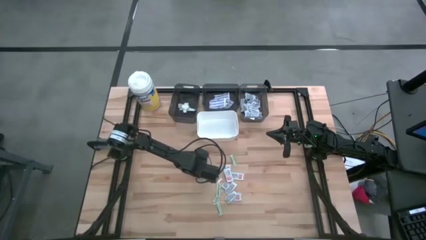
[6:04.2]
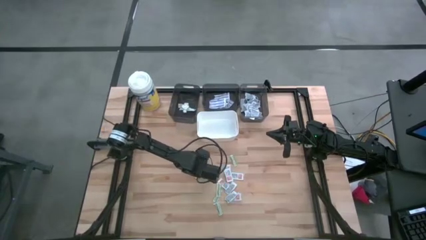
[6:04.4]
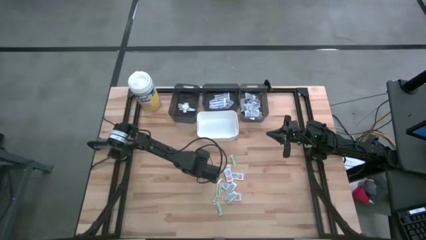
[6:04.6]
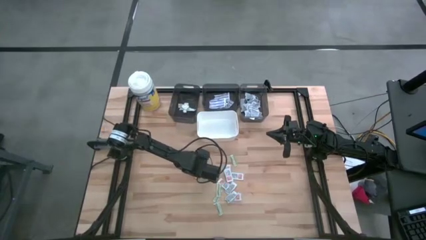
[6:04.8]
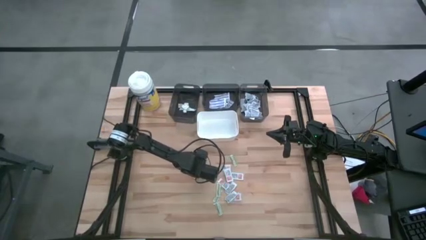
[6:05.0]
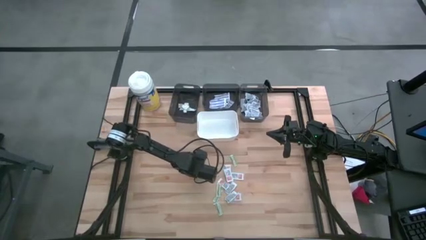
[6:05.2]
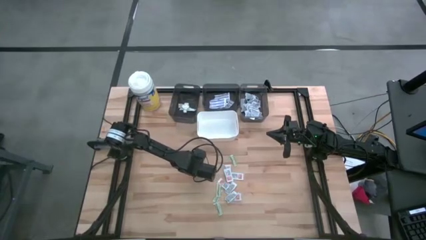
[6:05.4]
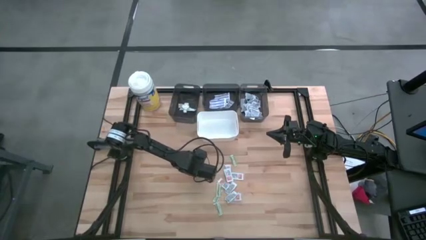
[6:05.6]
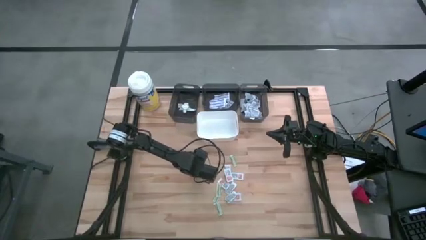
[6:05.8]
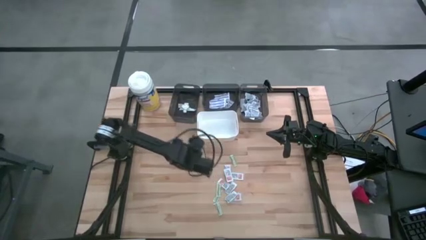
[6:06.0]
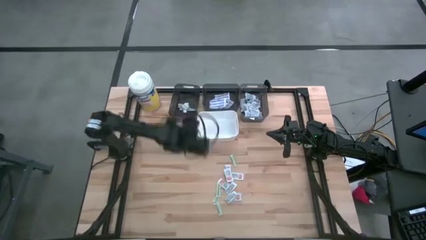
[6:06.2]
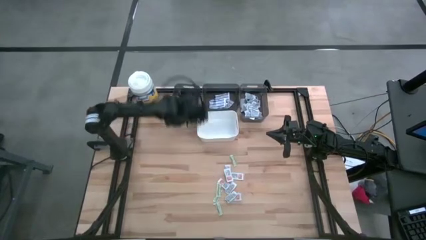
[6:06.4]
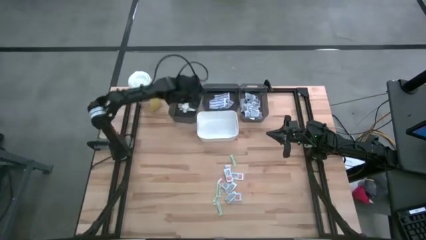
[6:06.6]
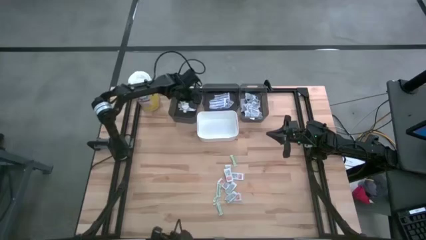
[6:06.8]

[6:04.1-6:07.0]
Task: Pick & Place First Aid Supplies
Put the green bandage pack into the left black bin

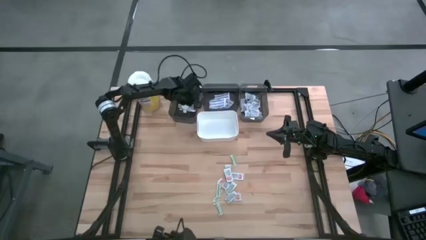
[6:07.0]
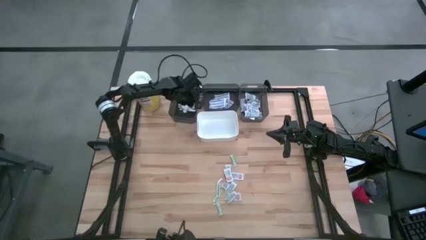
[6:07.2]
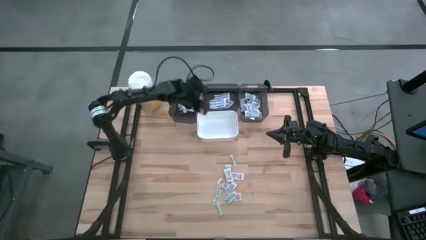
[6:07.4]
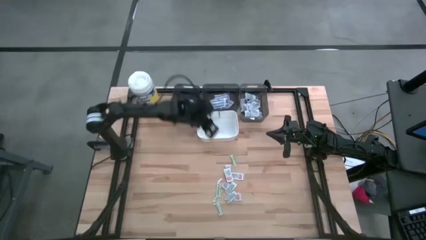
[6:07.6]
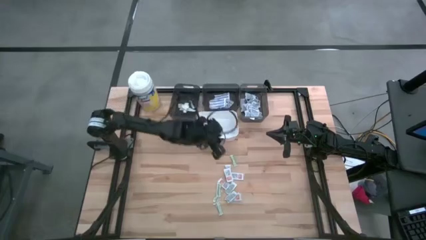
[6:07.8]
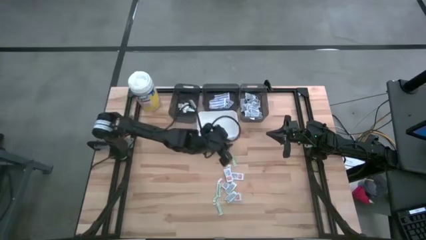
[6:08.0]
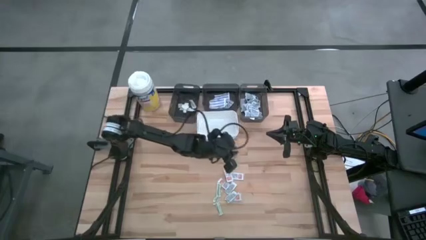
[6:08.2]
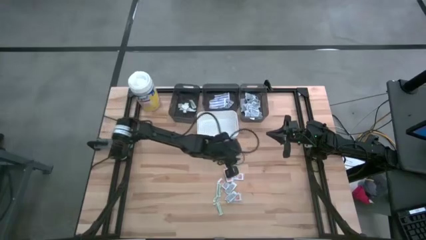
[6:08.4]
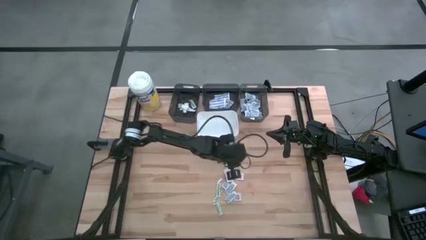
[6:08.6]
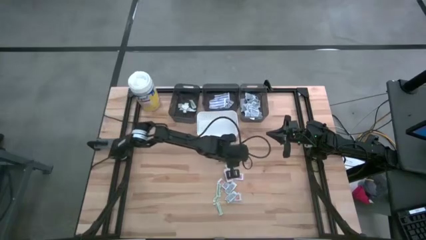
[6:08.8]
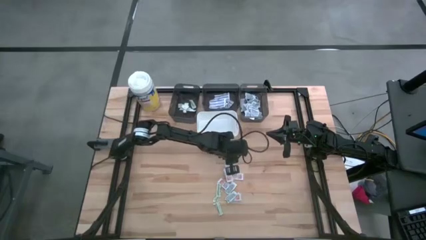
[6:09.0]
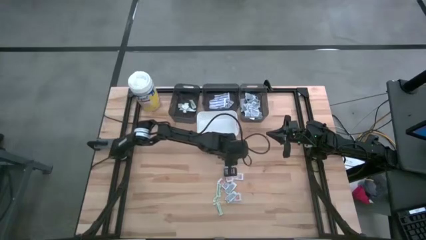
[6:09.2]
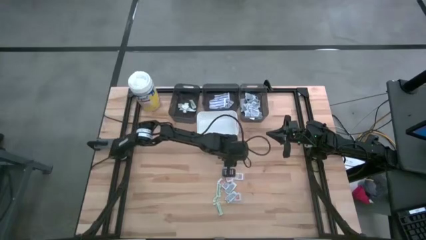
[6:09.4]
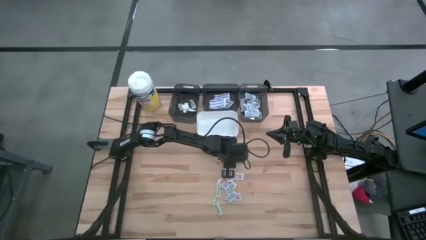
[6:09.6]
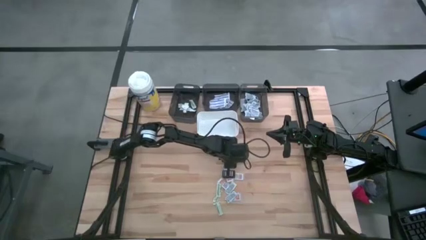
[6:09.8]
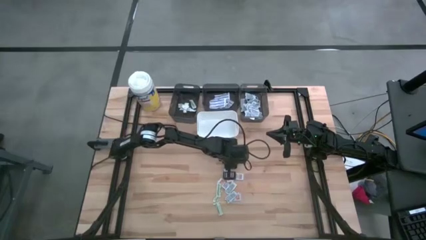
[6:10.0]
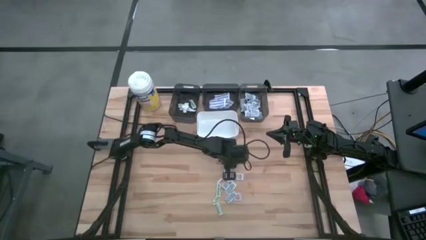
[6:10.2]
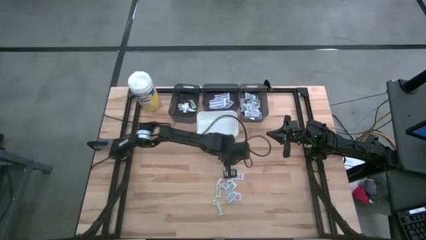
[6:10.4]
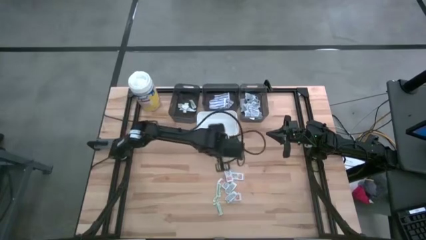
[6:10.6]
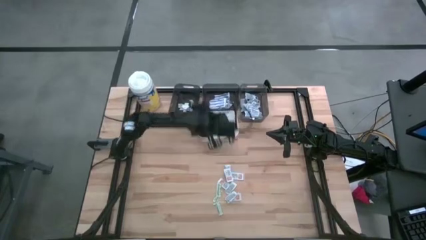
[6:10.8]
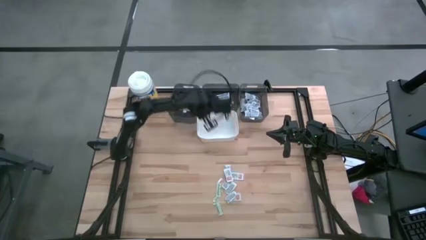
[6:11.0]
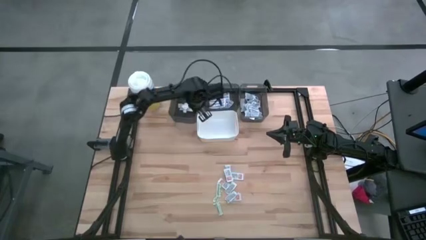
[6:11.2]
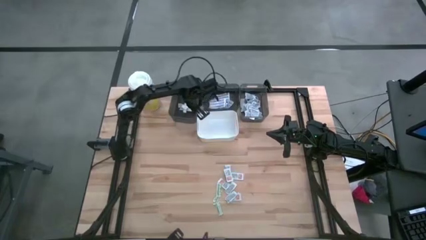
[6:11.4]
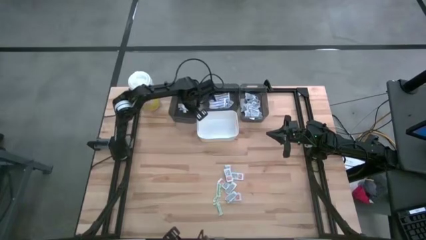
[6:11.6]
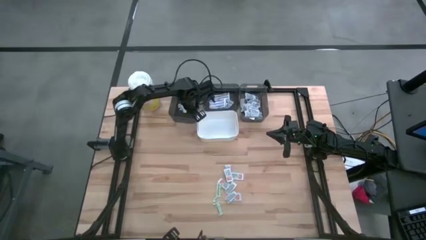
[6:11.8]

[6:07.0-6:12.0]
Put the green bandage pack into the left black bin

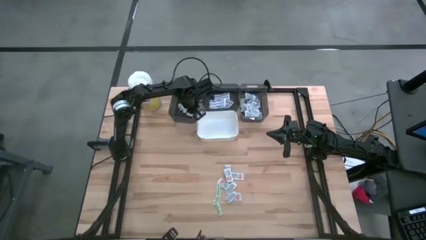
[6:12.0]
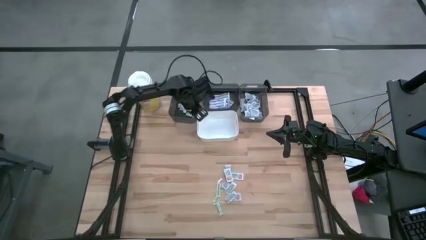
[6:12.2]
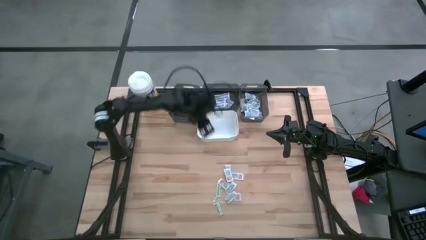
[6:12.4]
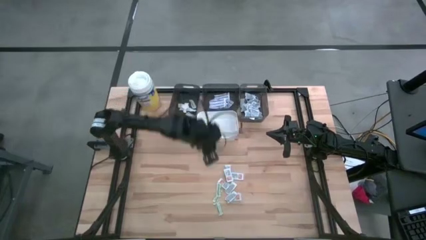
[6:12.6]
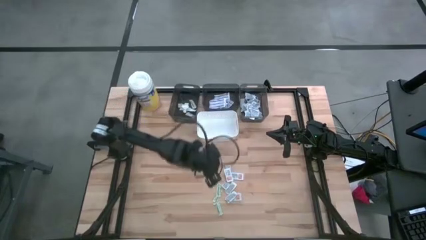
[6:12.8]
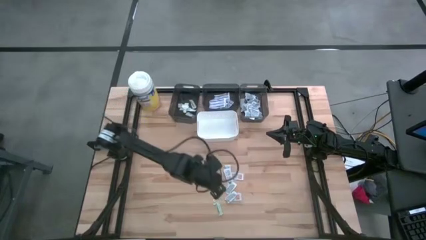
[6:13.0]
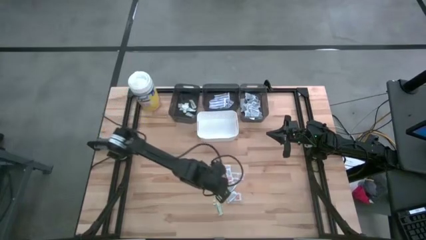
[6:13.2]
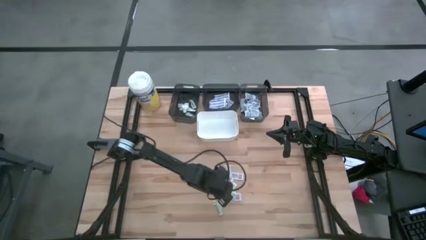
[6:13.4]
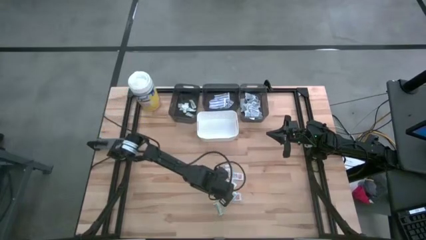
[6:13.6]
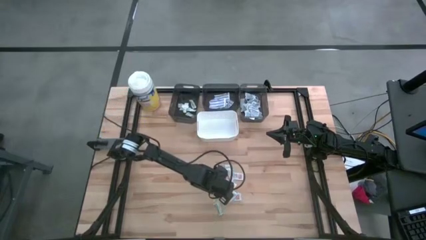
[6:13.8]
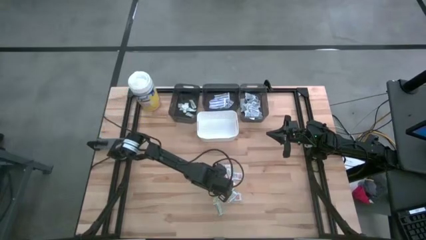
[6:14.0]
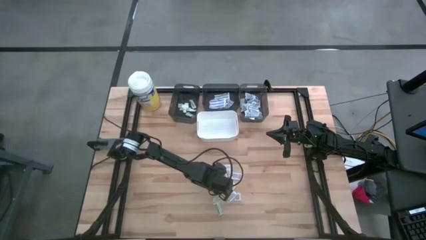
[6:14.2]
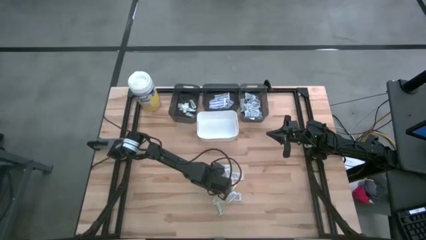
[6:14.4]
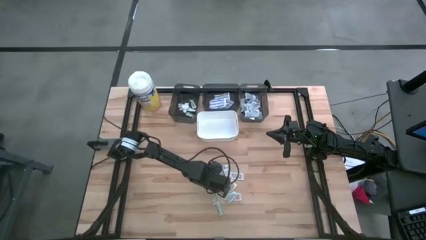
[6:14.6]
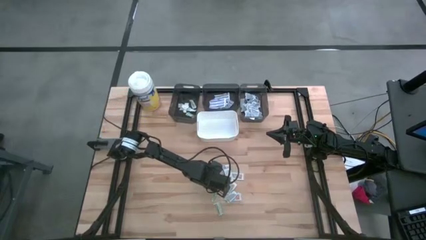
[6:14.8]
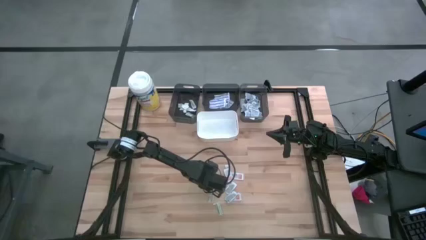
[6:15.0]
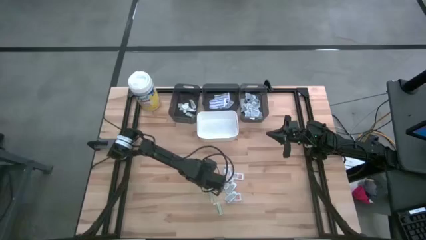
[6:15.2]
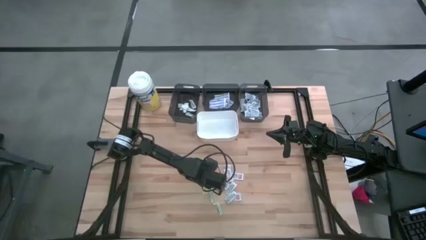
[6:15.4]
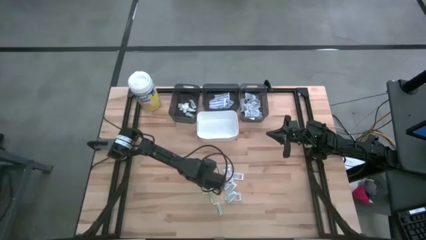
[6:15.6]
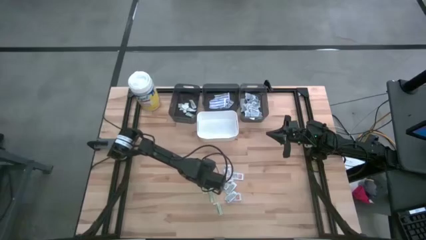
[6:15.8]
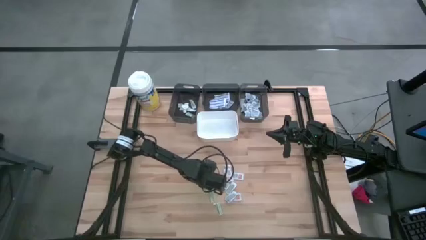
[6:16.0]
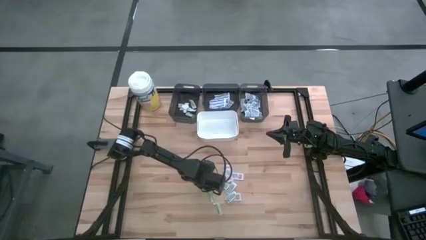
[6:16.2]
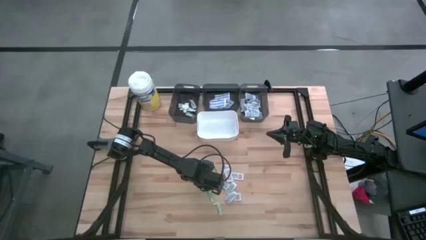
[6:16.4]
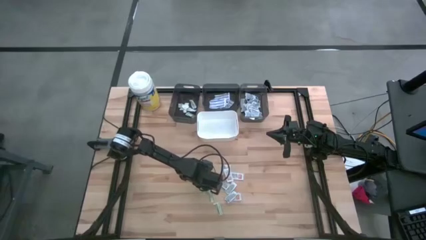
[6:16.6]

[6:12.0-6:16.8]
Put the green bandage pack into the left black bin

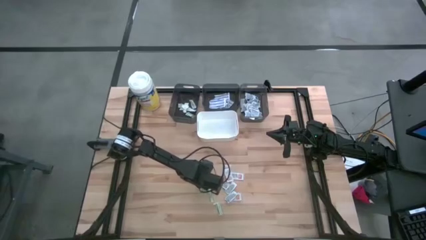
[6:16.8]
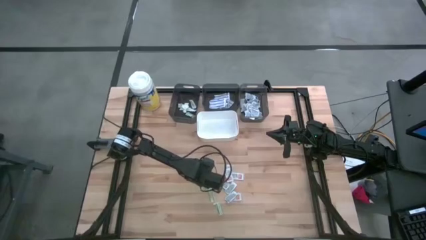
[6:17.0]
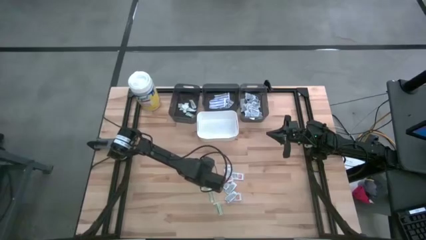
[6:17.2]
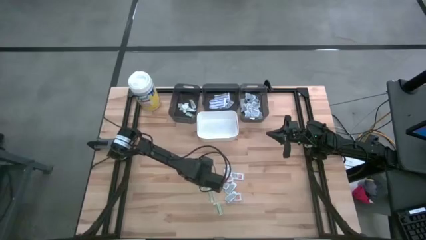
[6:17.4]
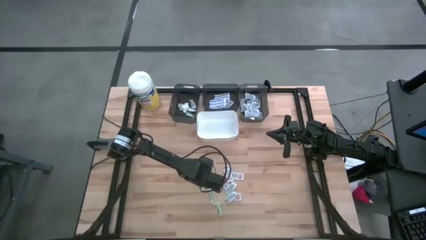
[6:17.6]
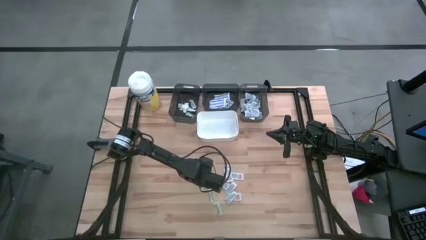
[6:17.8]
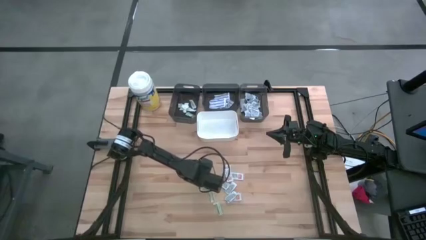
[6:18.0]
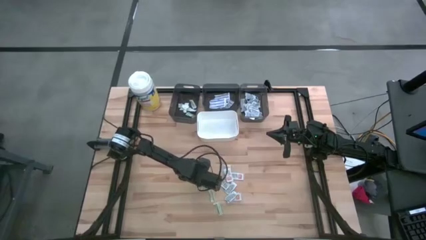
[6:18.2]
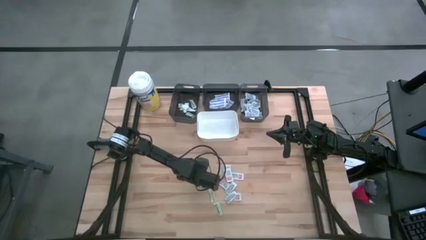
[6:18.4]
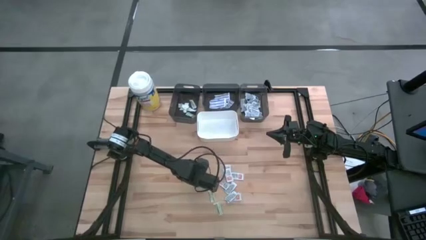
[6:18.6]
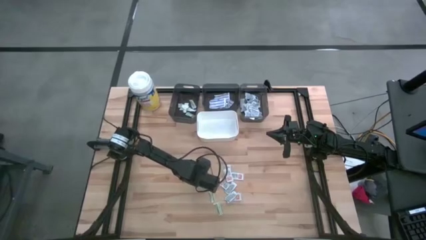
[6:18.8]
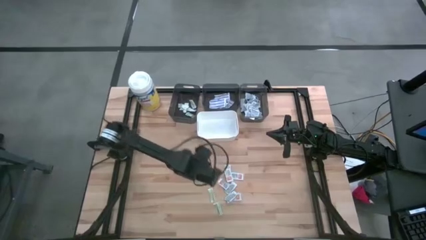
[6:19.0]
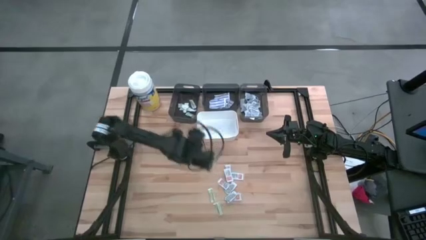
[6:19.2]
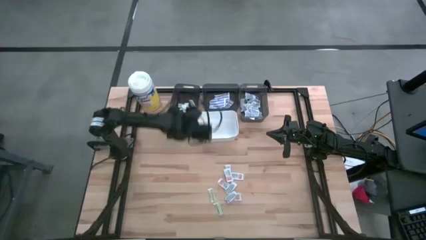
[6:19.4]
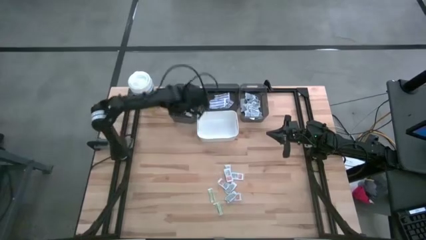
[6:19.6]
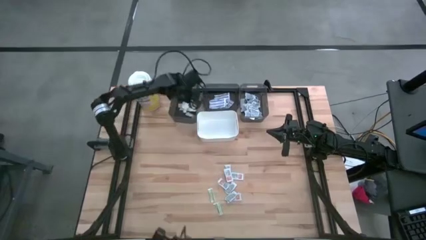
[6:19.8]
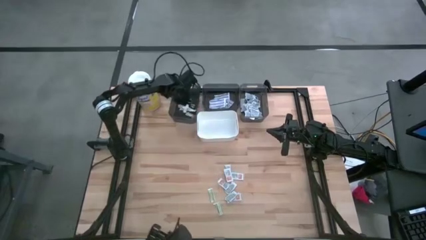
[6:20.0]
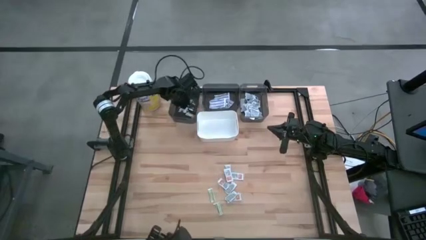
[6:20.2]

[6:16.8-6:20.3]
Put the green bandage pack into the left black bin
